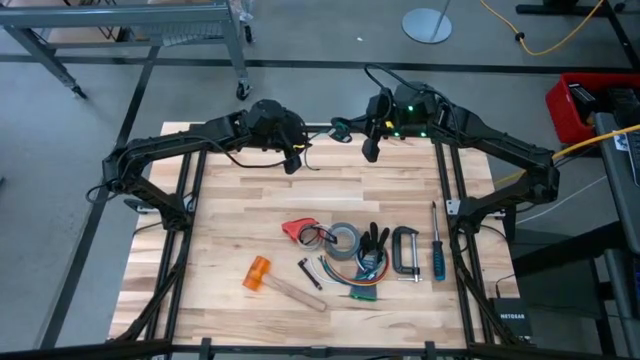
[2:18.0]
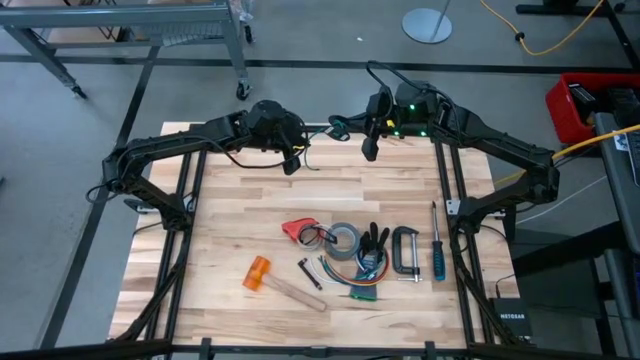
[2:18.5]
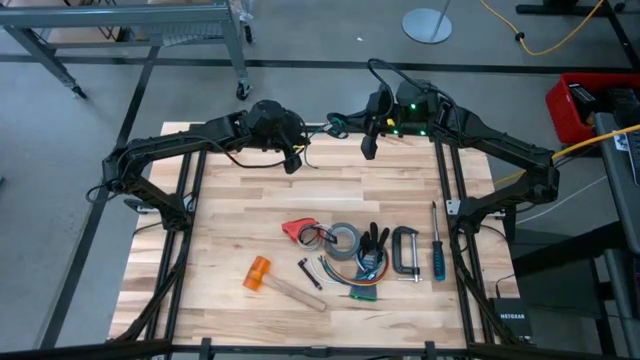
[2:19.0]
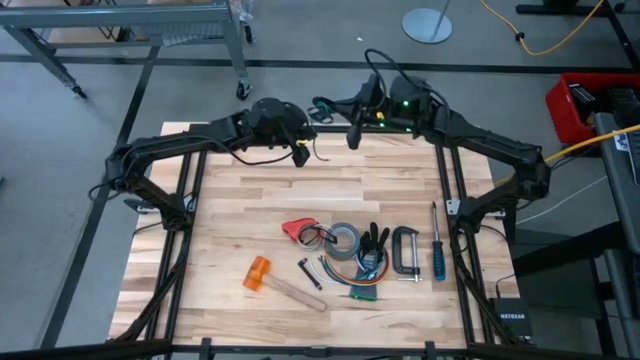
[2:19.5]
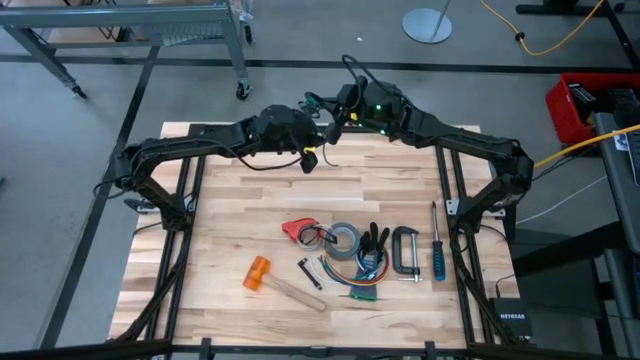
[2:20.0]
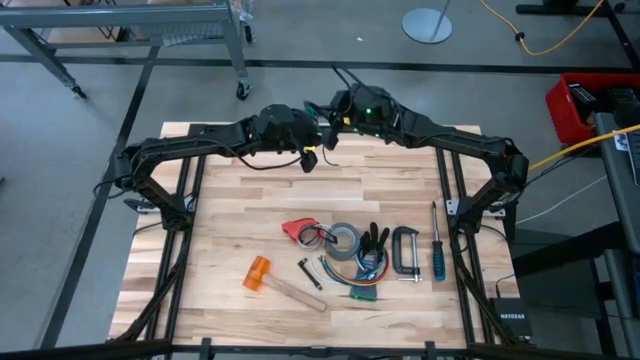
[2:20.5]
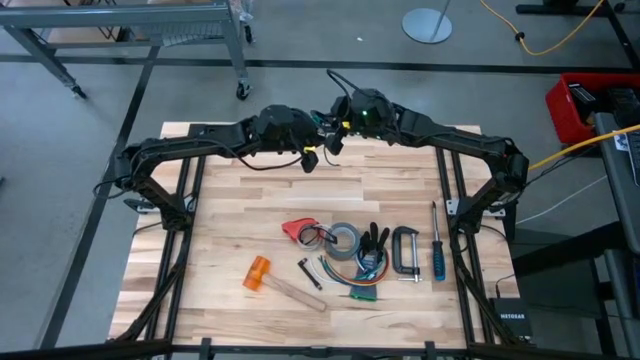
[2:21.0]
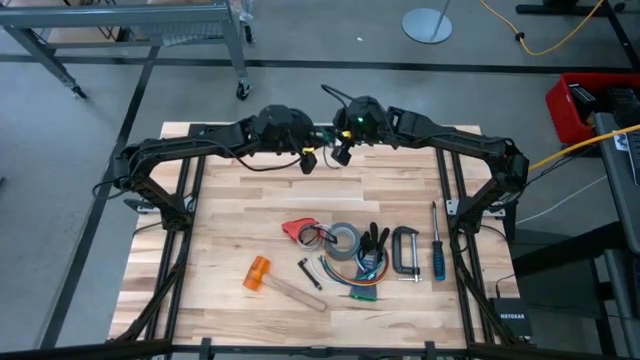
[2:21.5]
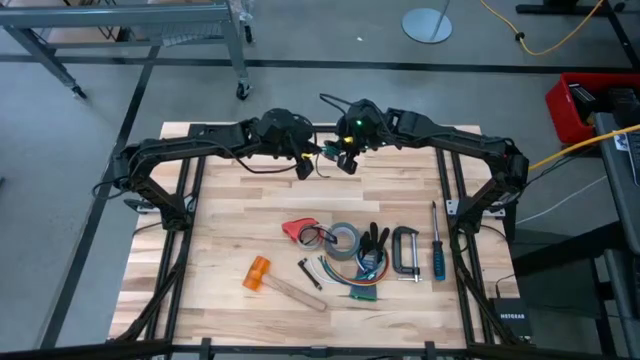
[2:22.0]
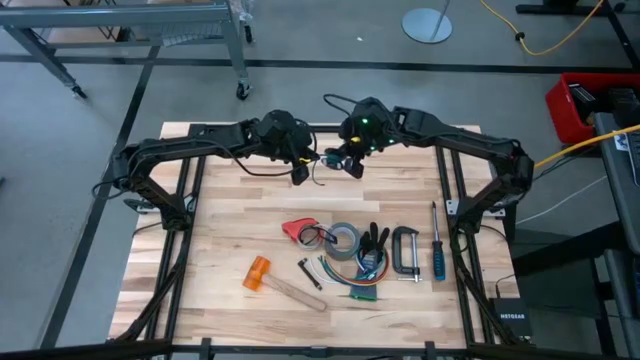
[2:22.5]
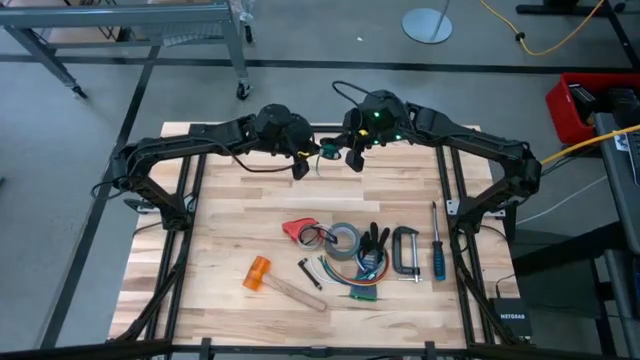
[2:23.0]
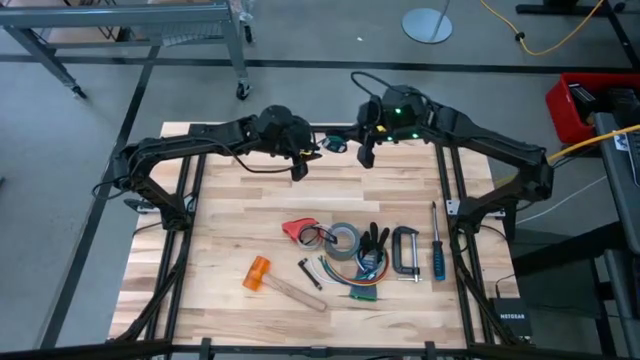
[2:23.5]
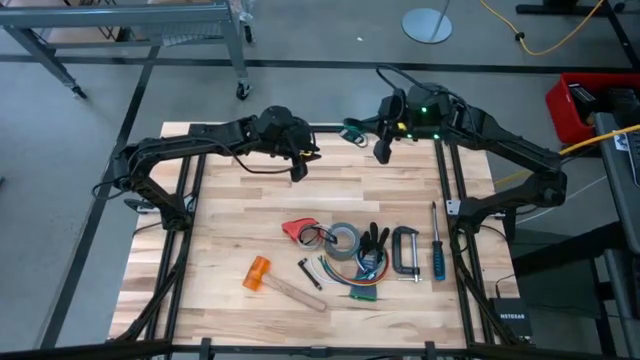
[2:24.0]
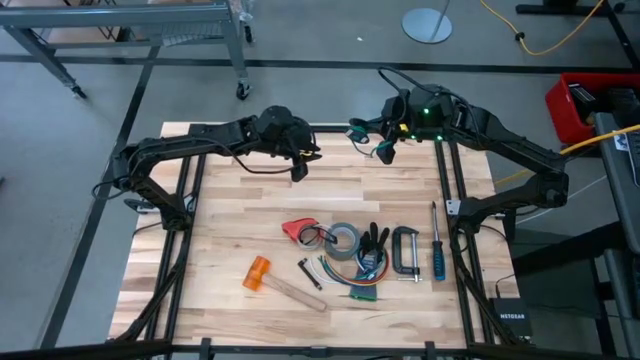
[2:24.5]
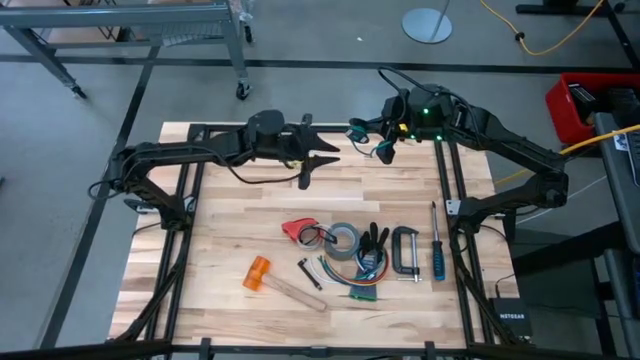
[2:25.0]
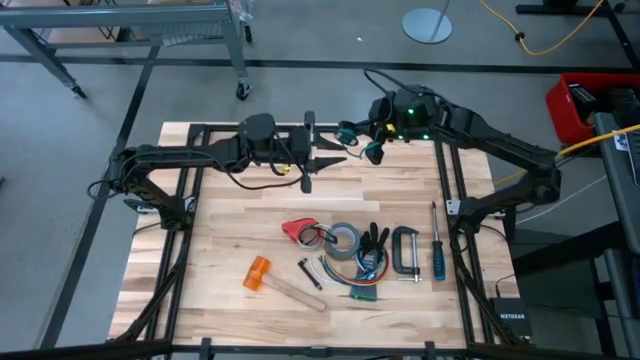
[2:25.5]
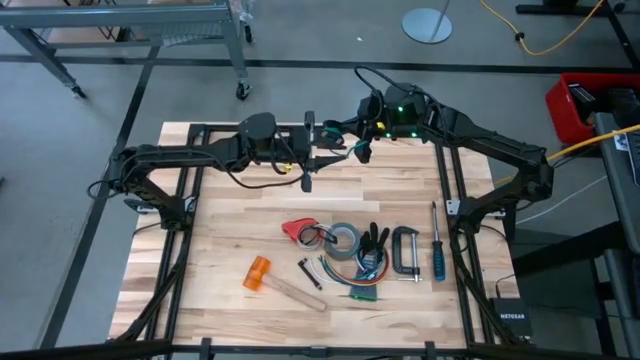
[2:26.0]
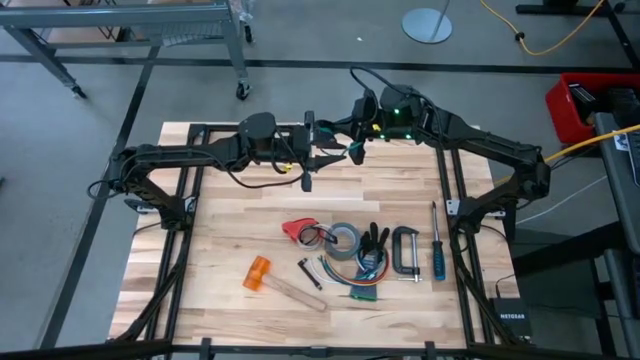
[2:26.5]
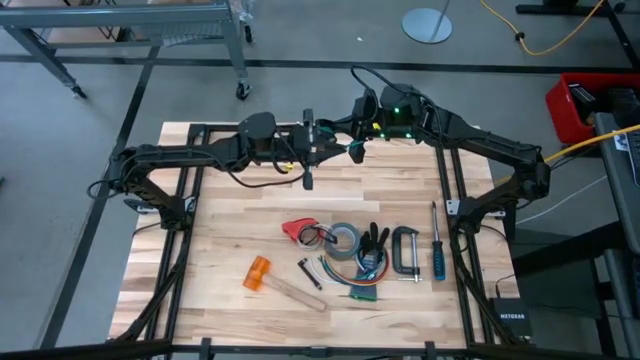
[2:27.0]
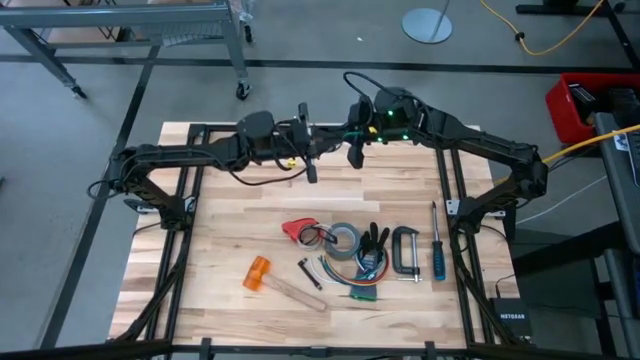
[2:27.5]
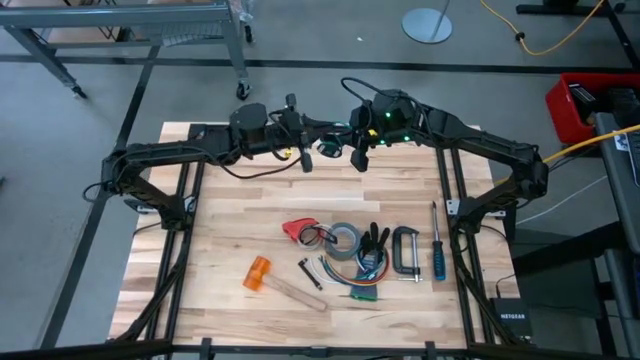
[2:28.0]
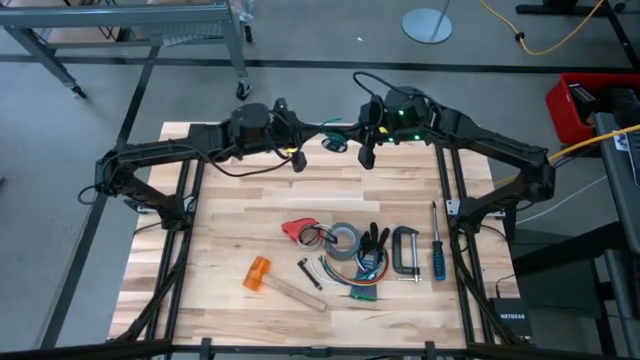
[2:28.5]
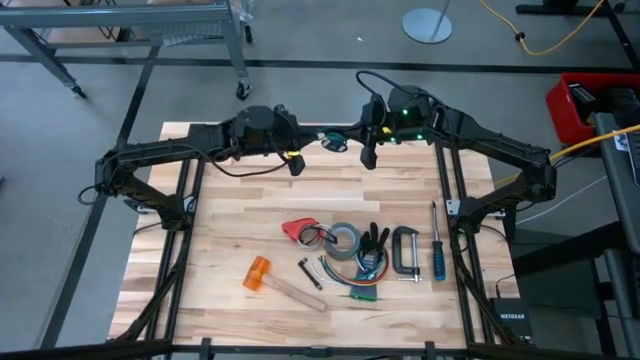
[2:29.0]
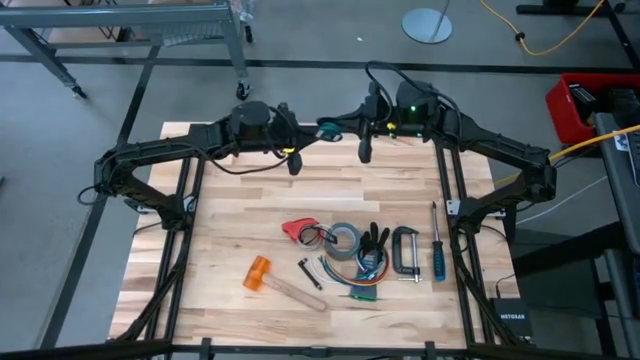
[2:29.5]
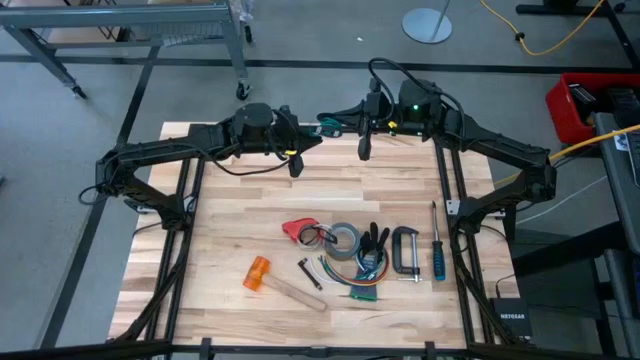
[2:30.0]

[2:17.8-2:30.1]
Task: Coil cords
Coil the green cable wire on the black spool

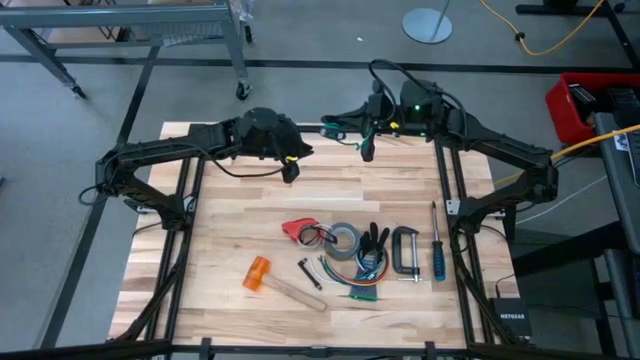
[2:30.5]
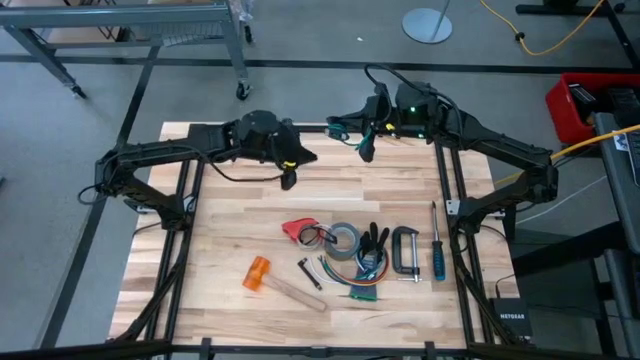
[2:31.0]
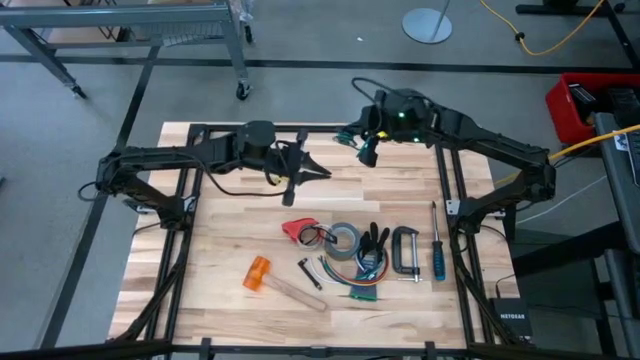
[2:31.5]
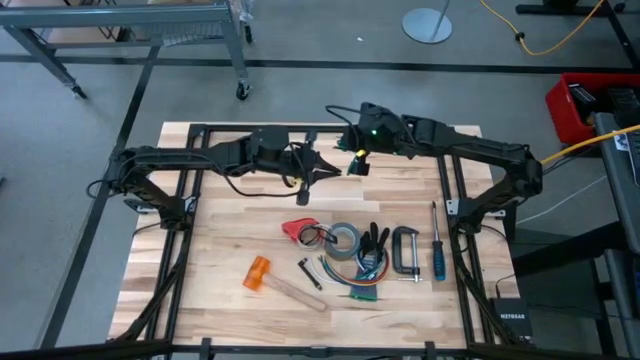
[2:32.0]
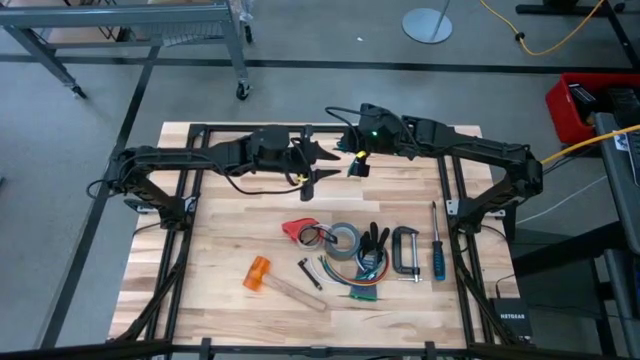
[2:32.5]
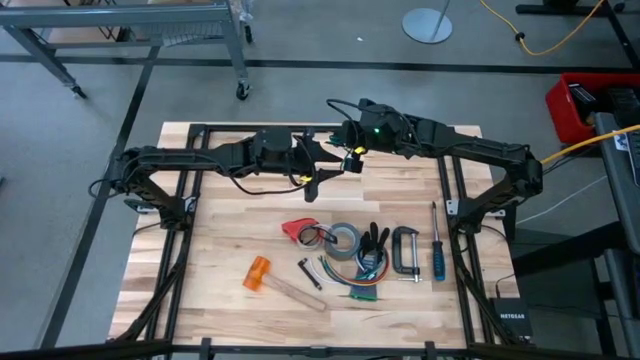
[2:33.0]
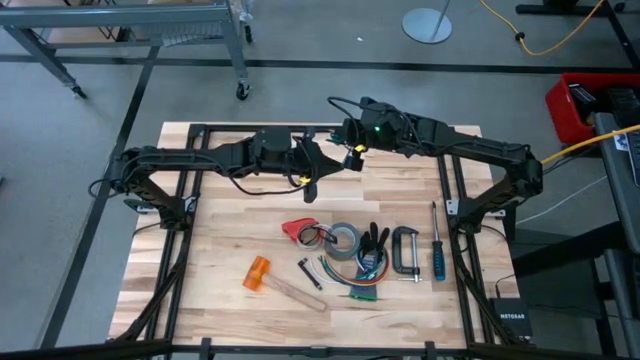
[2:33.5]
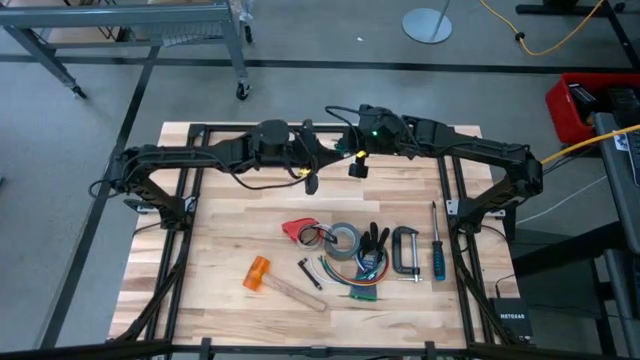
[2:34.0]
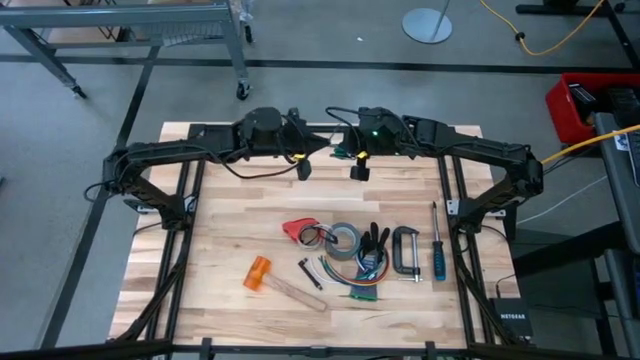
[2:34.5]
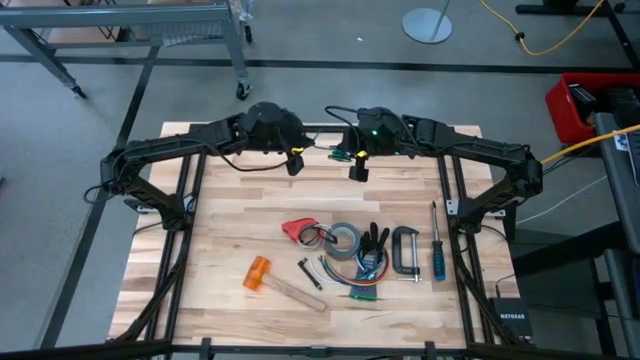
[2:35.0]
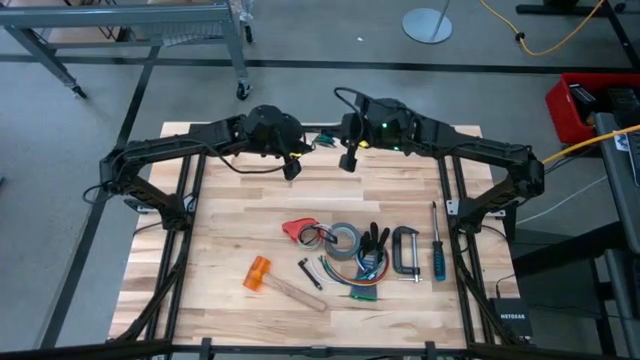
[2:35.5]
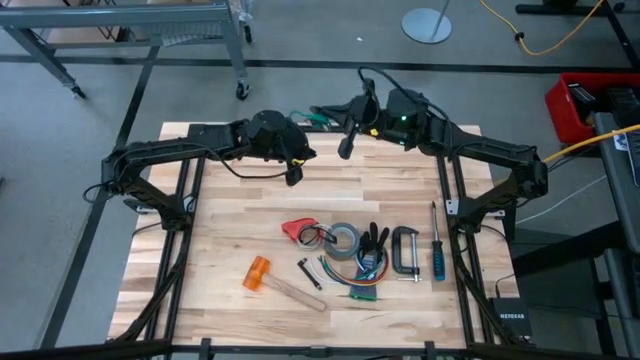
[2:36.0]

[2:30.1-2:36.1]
Coil the green cable wire on the black spool

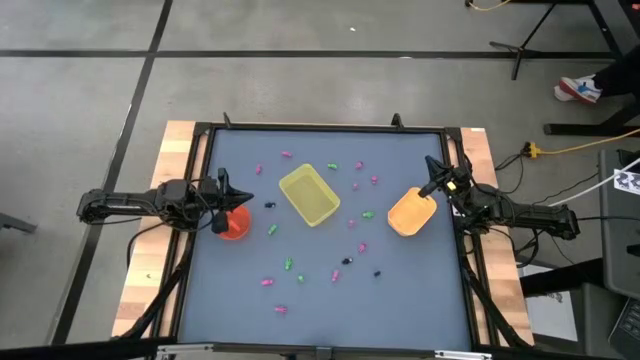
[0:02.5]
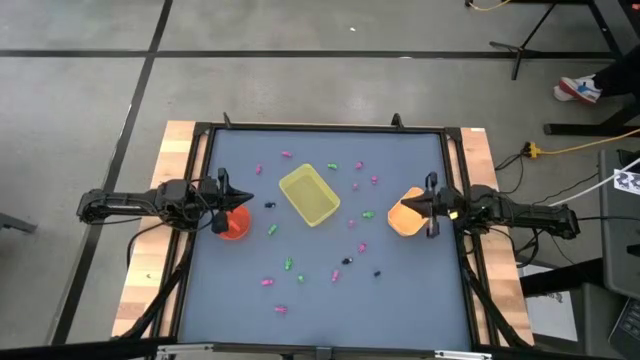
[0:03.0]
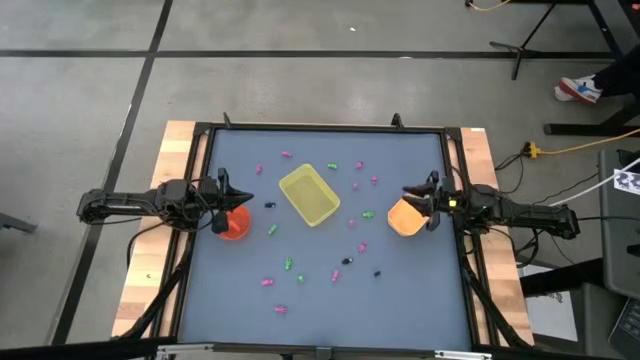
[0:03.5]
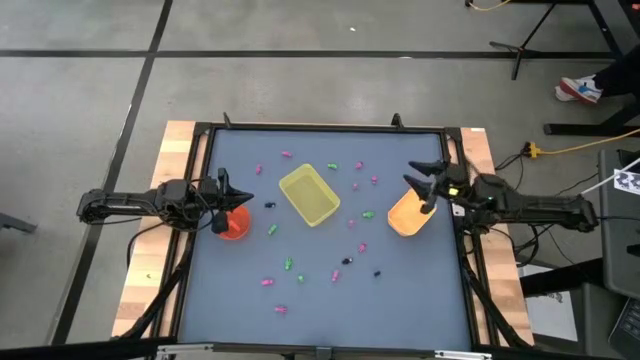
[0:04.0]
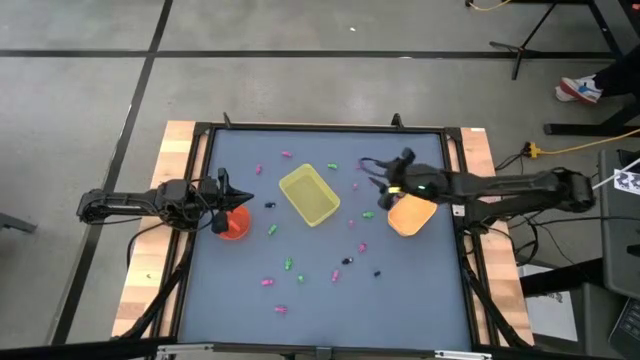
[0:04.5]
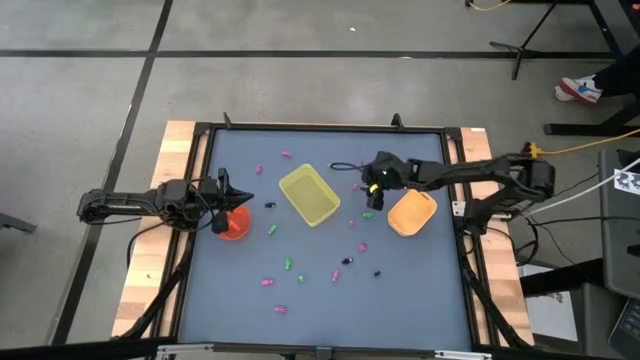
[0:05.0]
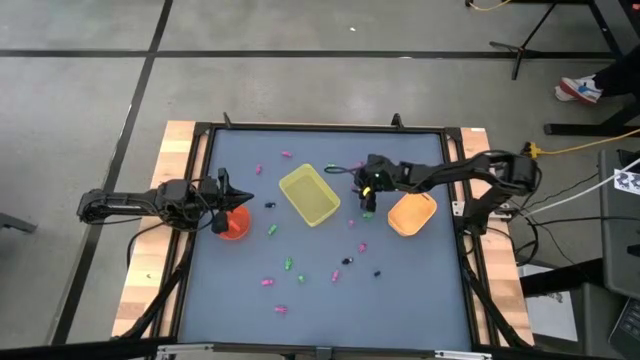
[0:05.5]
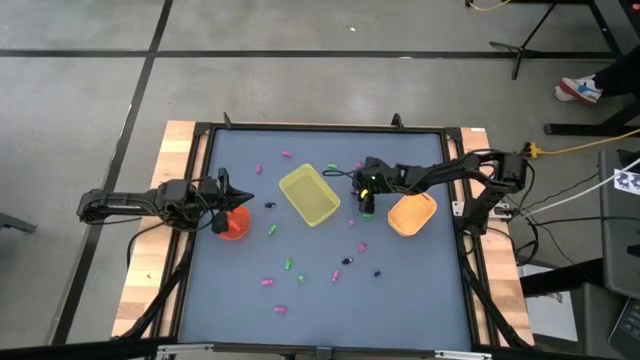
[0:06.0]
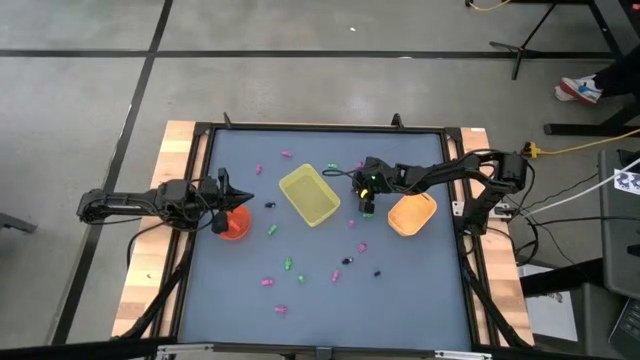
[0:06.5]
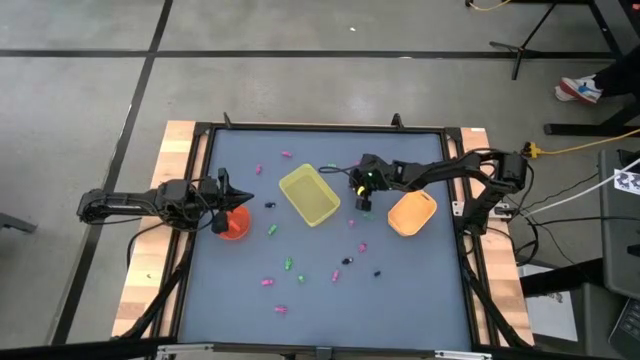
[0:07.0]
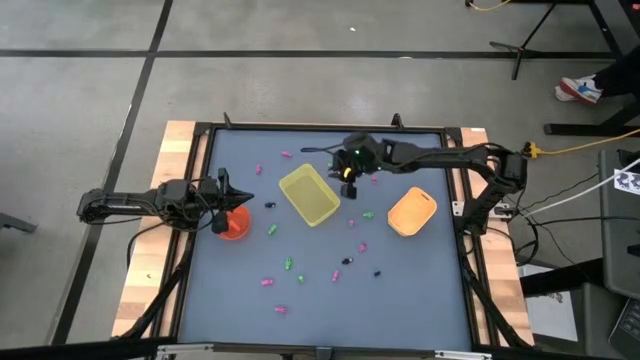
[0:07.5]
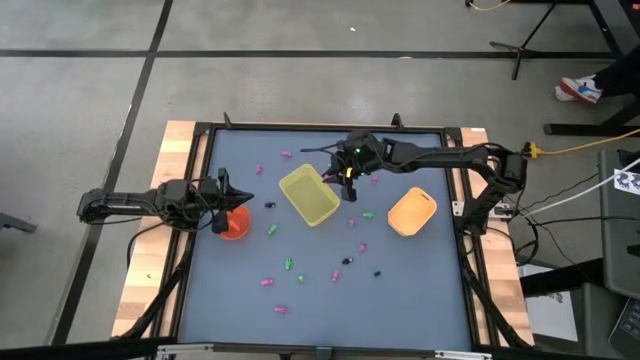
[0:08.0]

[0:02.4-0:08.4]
Task: Sort Halloween decoration
Put the pink skeleton toy into the left yellow bin
